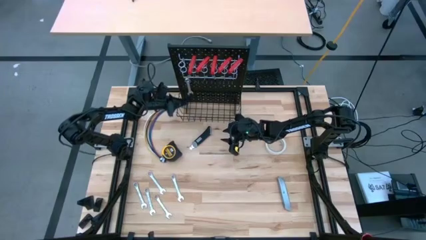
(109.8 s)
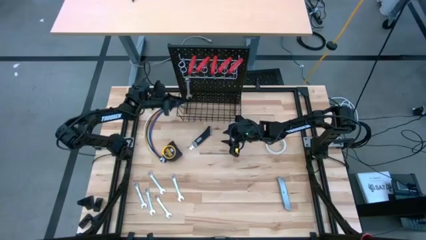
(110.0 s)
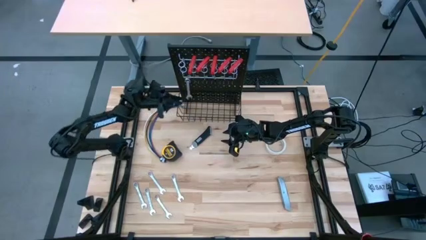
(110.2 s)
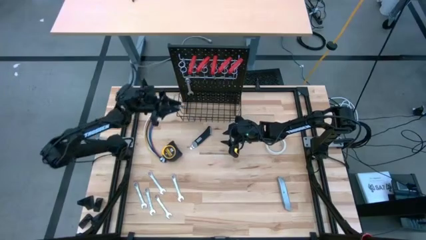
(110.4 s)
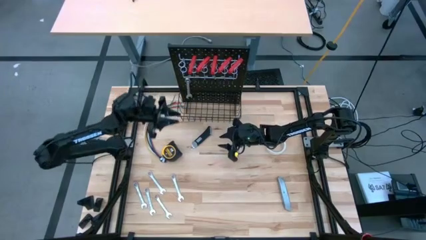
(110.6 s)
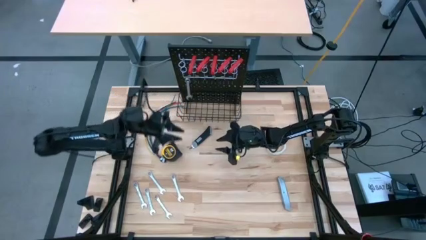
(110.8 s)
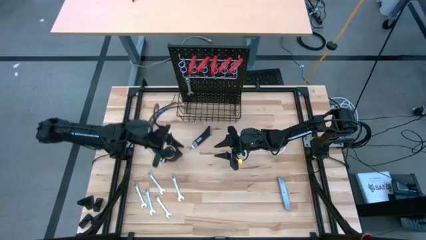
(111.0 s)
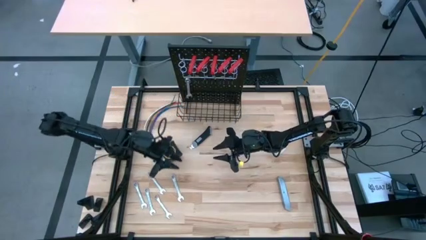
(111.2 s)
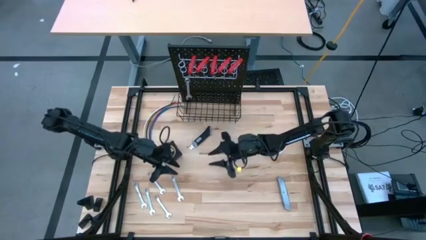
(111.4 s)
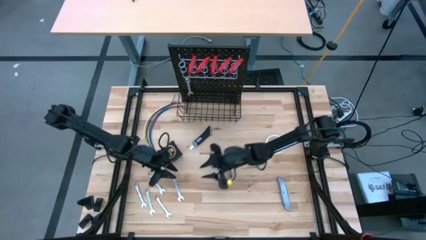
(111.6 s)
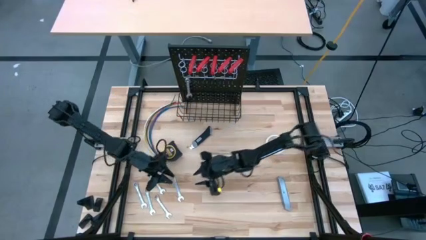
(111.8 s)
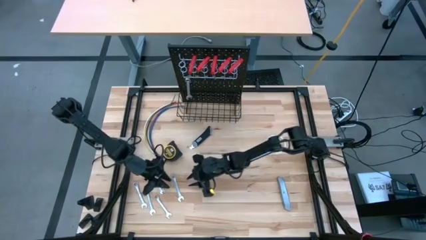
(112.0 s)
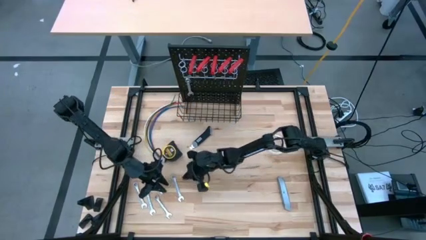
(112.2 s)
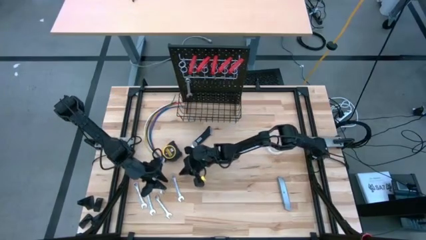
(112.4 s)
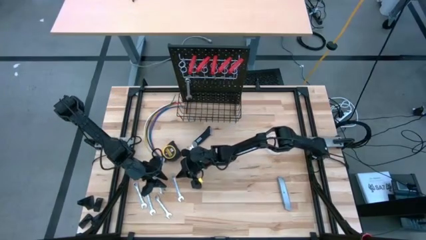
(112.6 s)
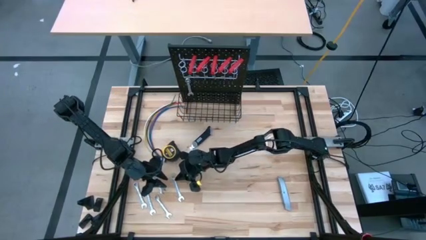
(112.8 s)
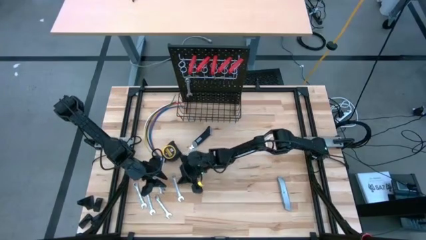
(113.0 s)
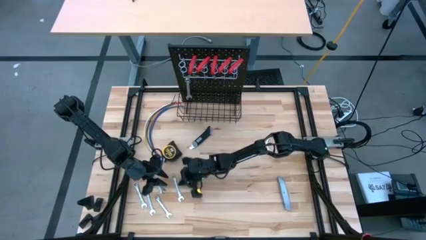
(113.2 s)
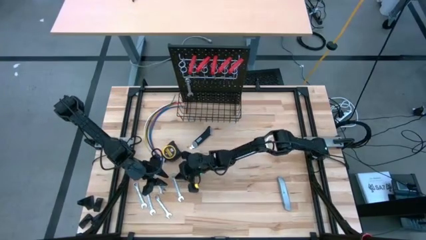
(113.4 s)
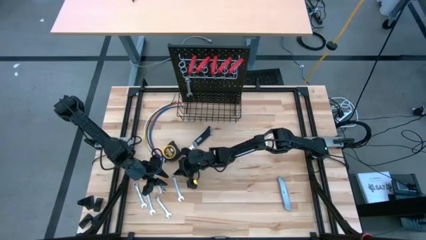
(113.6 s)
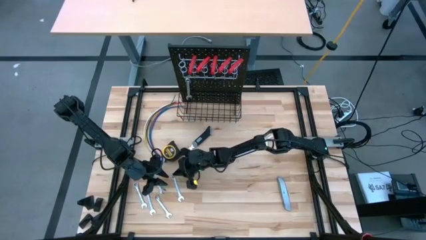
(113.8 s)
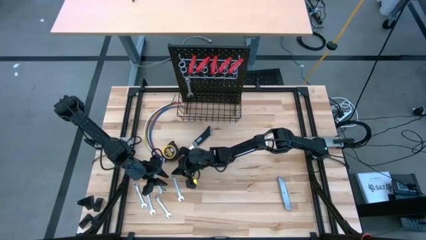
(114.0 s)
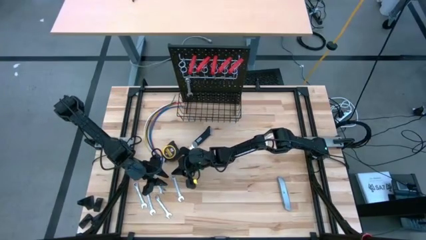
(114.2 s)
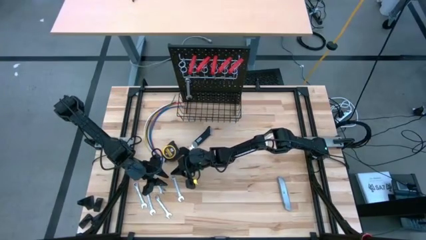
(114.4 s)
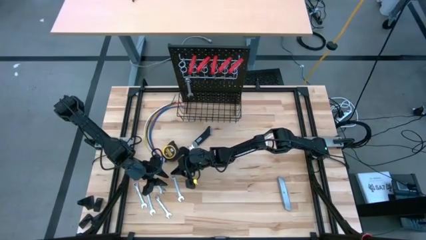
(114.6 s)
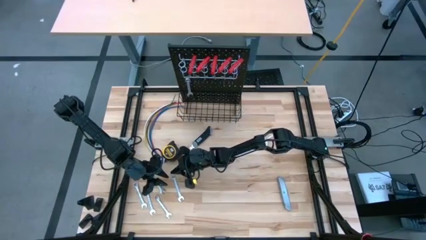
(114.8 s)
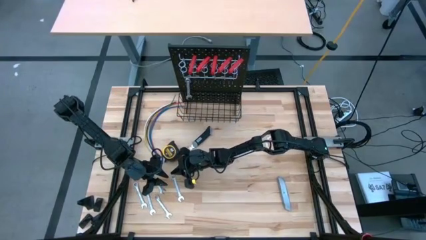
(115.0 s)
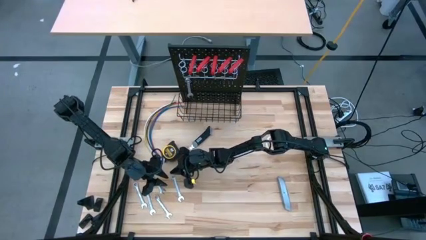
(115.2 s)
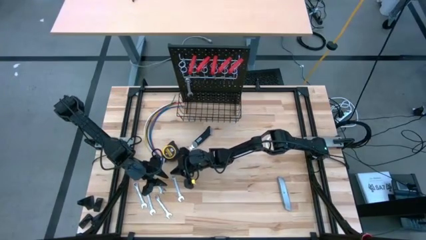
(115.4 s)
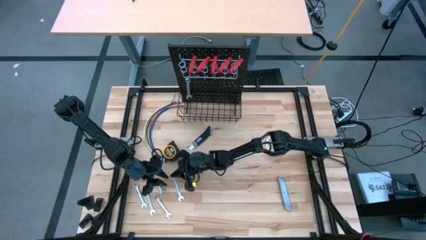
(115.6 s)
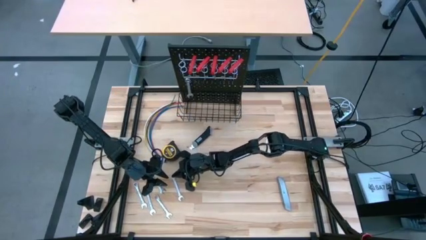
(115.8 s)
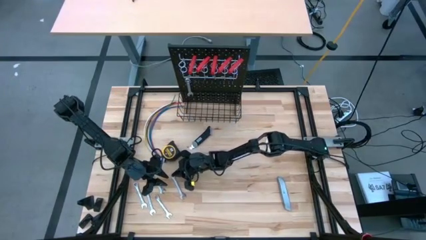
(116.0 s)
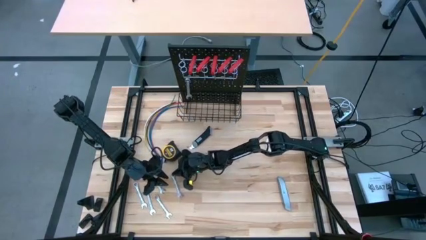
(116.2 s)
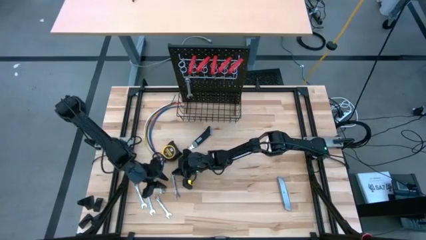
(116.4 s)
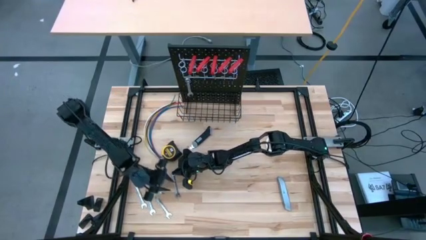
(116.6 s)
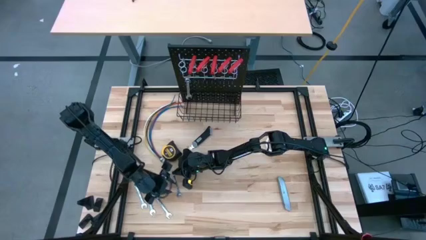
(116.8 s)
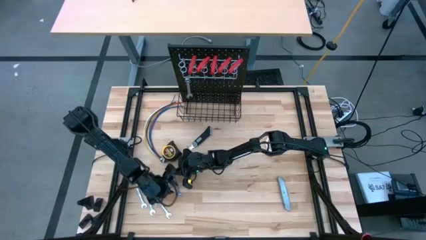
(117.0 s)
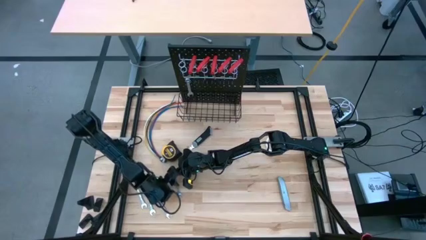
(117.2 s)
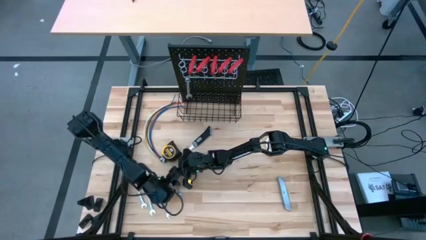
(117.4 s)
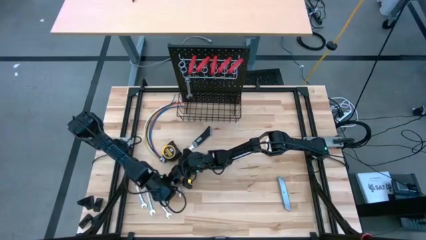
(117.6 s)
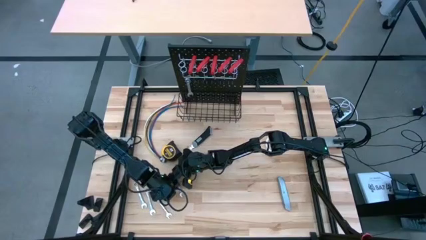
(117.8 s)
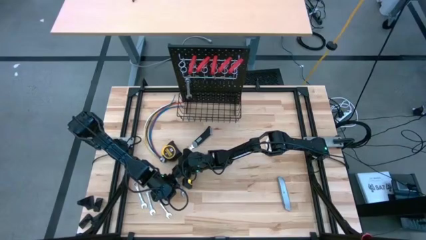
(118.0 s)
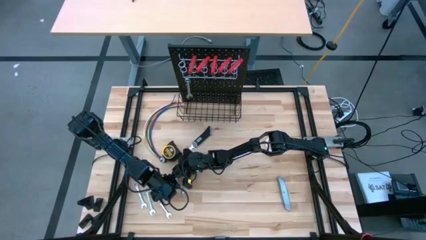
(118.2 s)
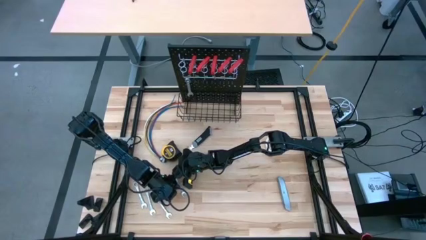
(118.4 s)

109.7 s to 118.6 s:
Task: Hang tools onto peg board
Hang the wrench on the peg board

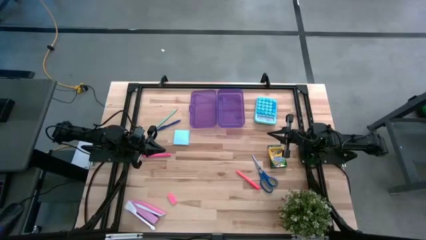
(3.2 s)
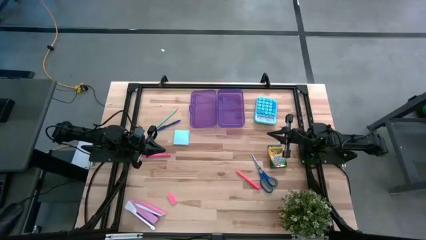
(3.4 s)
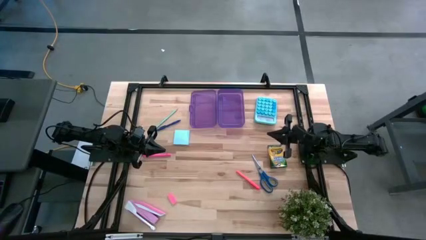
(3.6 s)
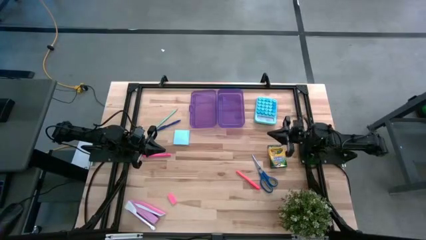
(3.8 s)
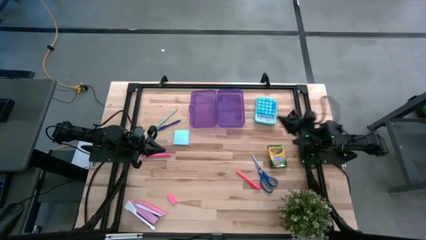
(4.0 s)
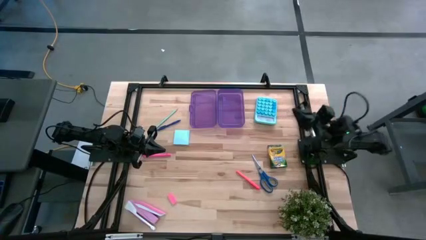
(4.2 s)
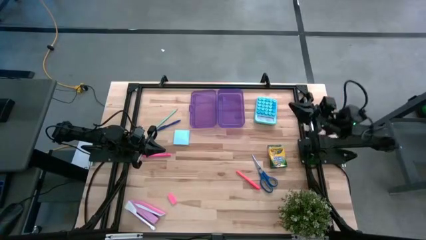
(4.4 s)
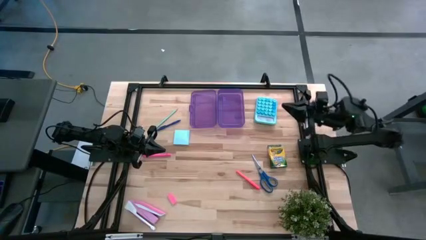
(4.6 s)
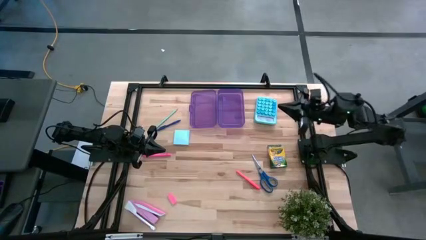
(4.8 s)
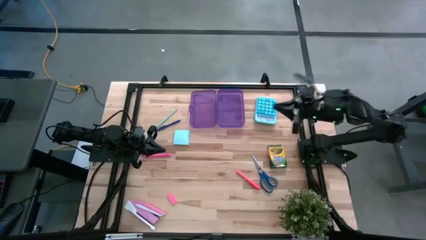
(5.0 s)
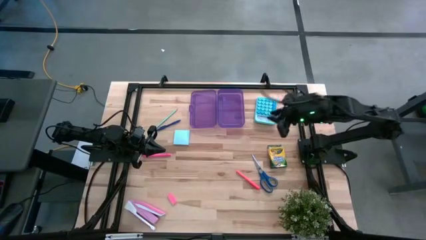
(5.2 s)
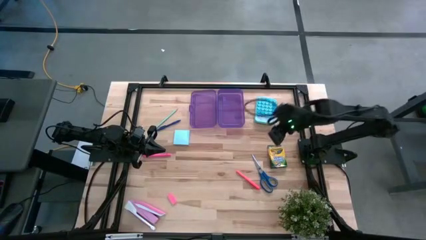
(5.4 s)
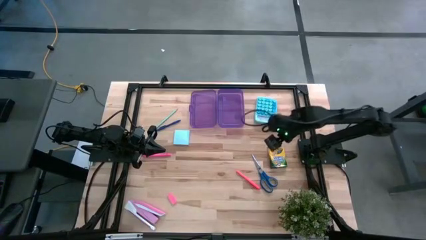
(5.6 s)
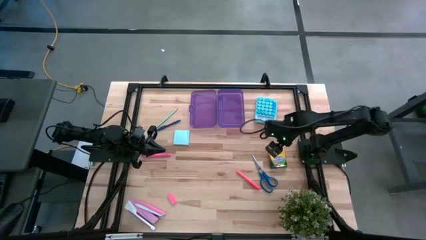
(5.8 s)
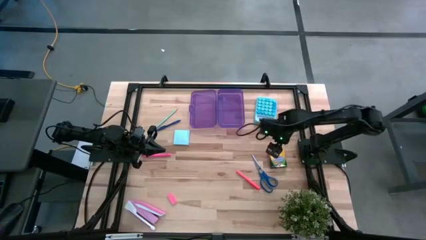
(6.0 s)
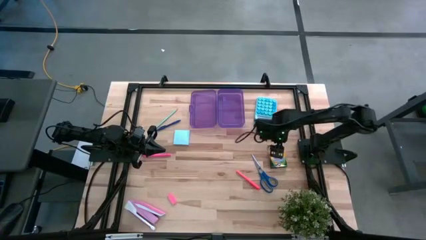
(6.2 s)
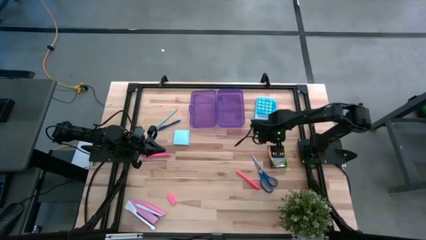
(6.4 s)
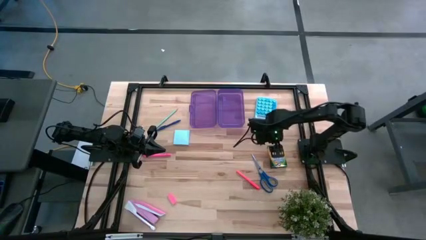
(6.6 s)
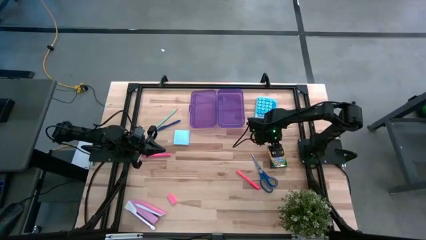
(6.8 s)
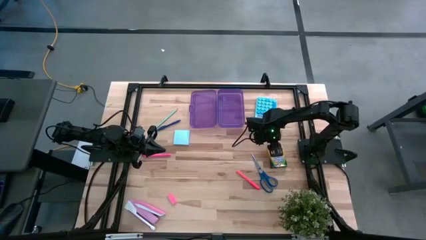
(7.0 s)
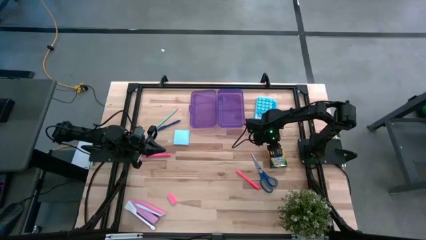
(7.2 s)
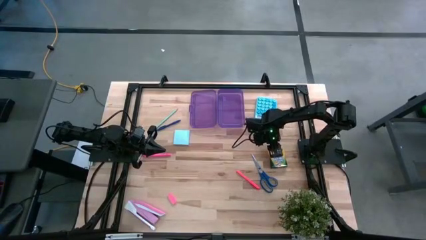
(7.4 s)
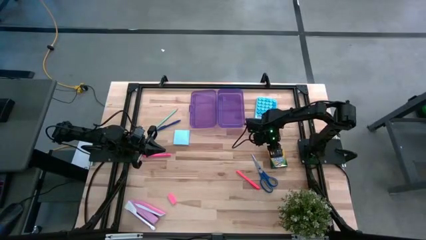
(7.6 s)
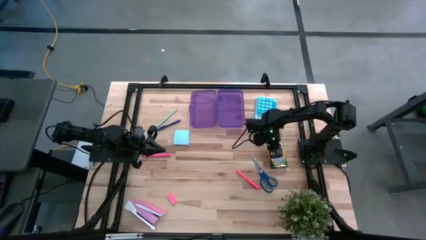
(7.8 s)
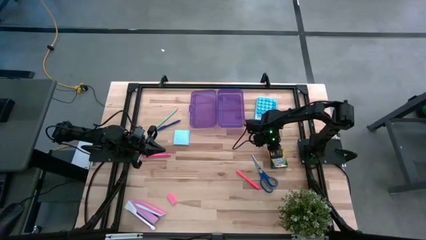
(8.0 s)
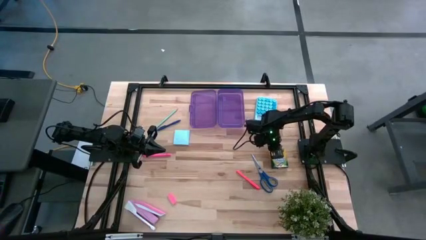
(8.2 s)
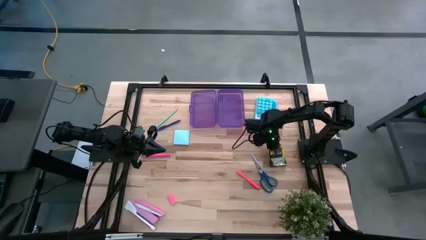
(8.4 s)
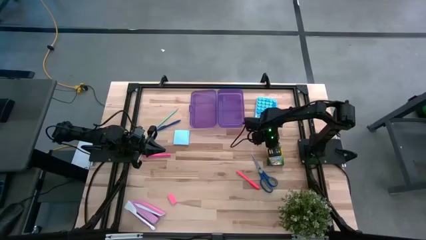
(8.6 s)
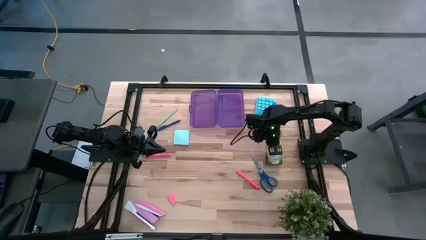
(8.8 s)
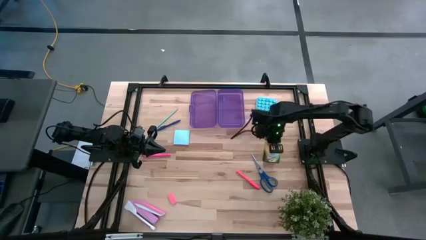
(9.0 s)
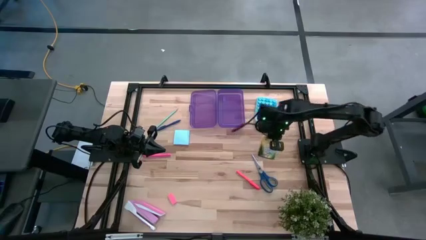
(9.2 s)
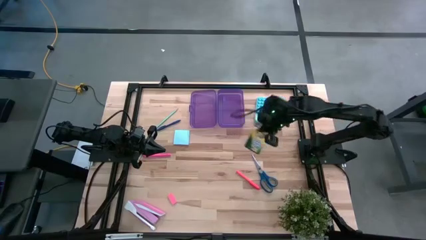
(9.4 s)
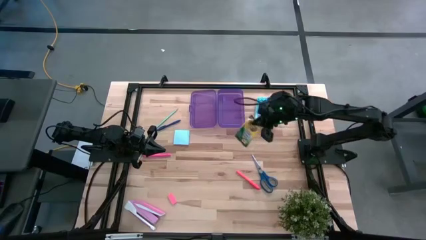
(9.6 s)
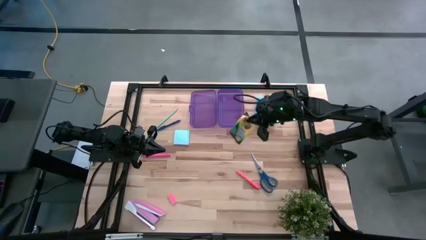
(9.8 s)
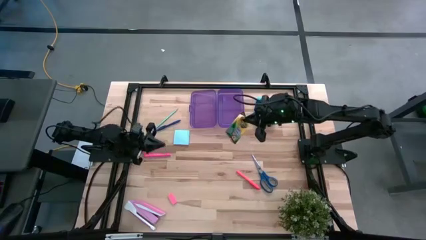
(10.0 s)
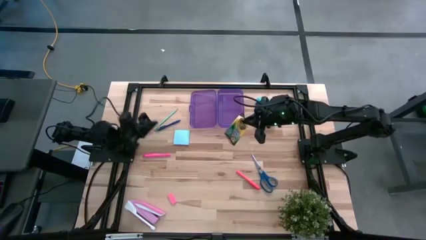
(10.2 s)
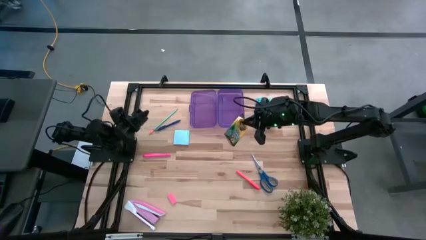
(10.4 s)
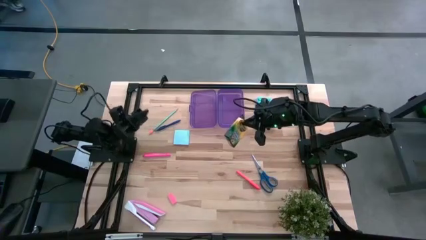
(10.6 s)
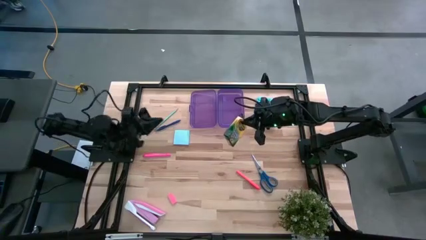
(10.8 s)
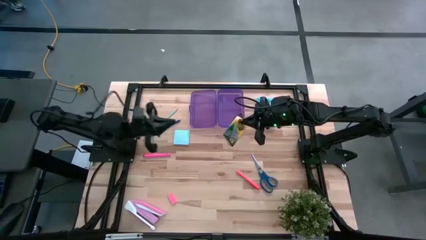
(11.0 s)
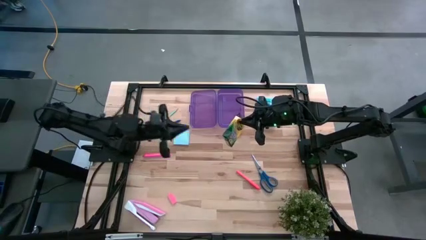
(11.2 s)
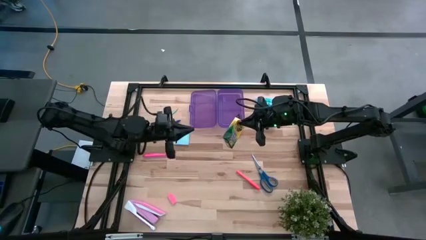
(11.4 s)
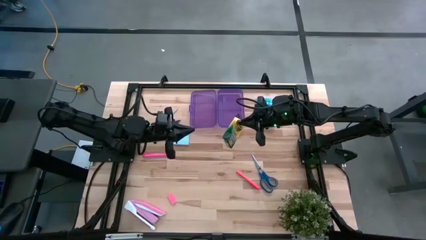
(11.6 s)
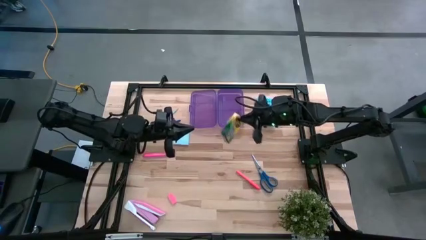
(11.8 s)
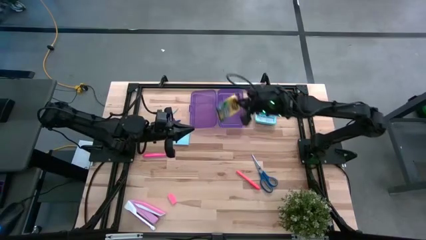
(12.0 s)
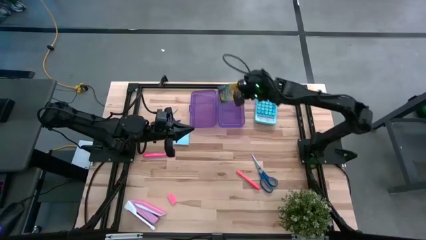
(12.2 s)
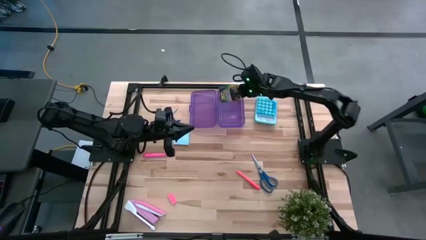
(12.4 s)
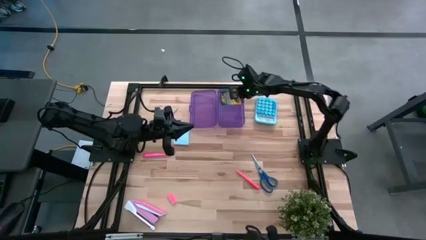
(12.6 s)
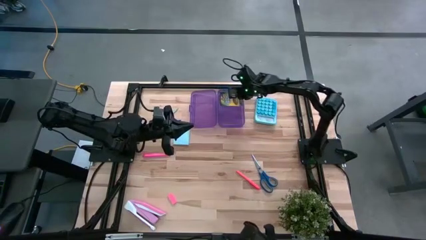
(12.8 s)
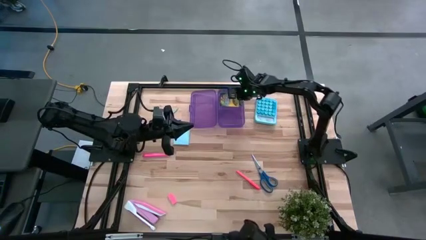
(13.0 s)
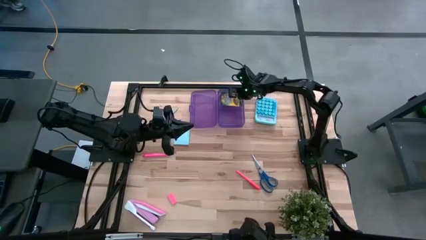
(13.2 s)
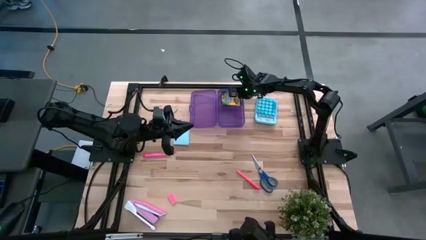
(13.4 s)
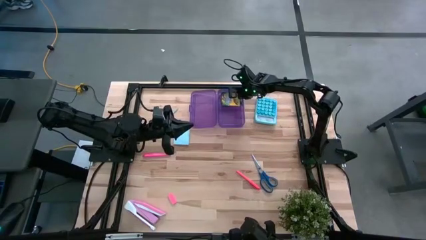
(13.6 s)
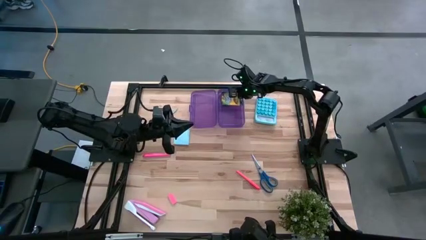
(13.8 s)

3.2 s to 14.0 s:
Task: Pack school essentials
Put the yellow crayon box into the purple supply box
